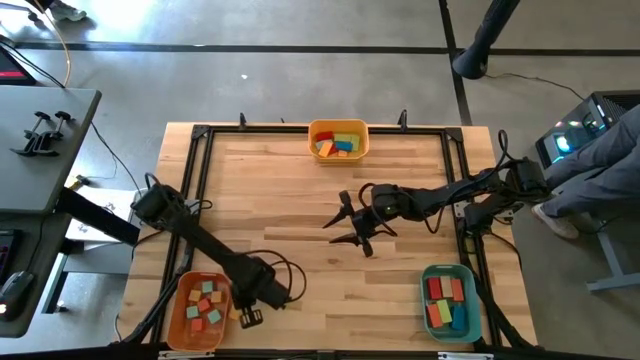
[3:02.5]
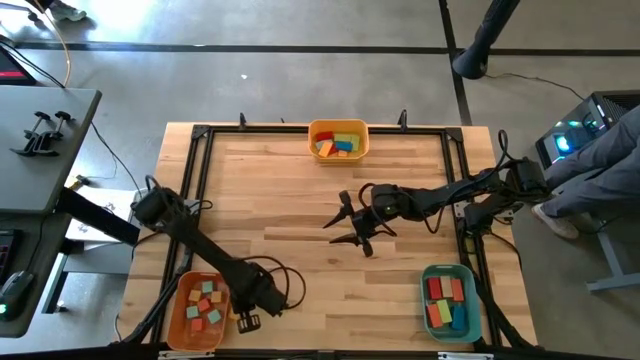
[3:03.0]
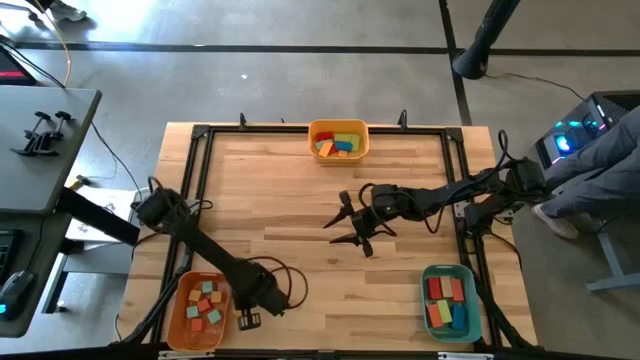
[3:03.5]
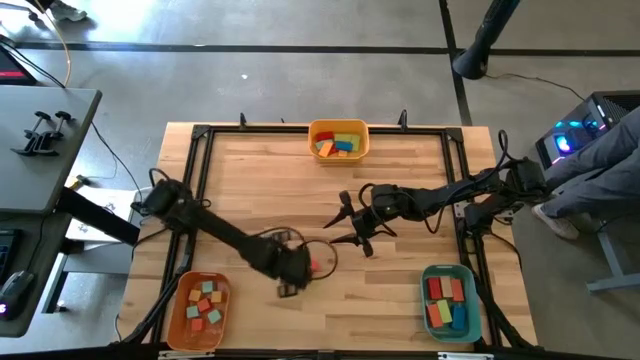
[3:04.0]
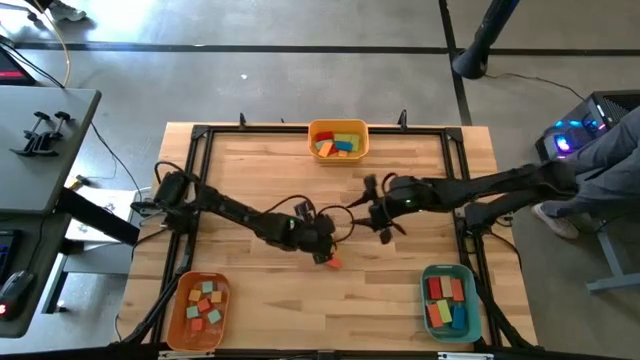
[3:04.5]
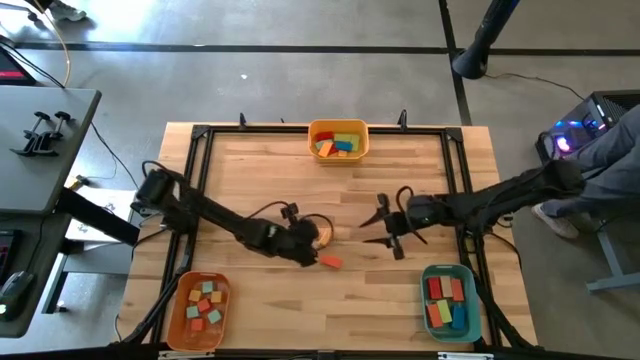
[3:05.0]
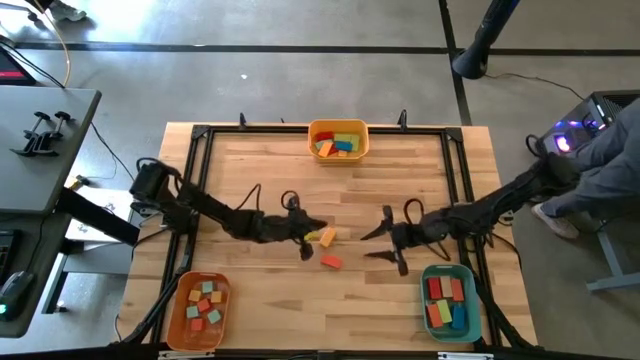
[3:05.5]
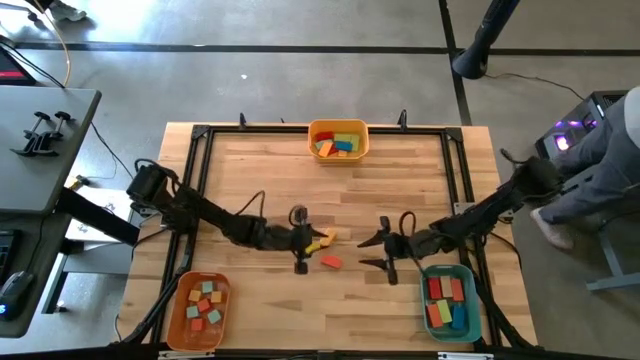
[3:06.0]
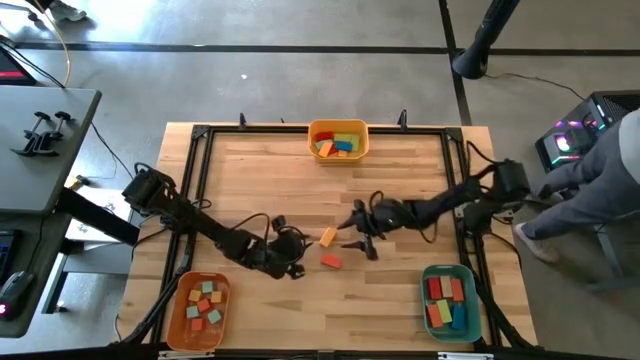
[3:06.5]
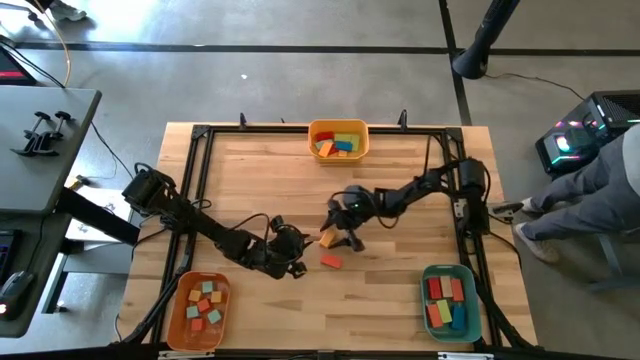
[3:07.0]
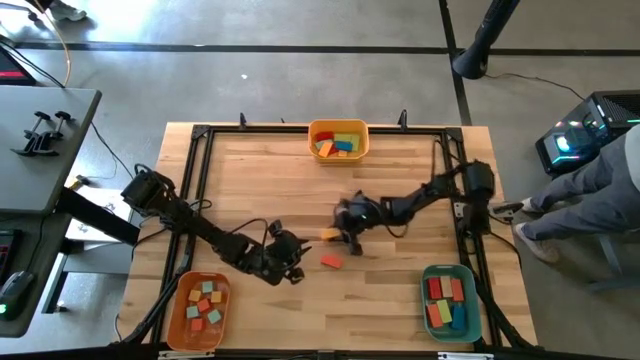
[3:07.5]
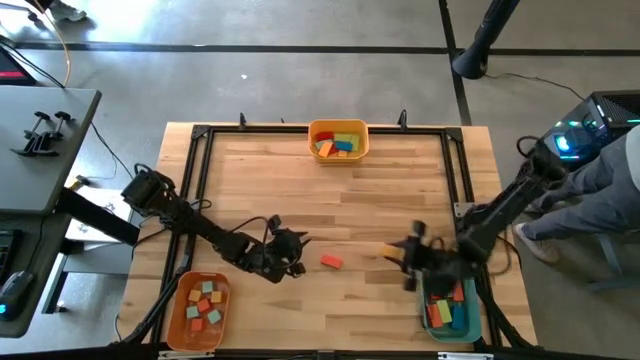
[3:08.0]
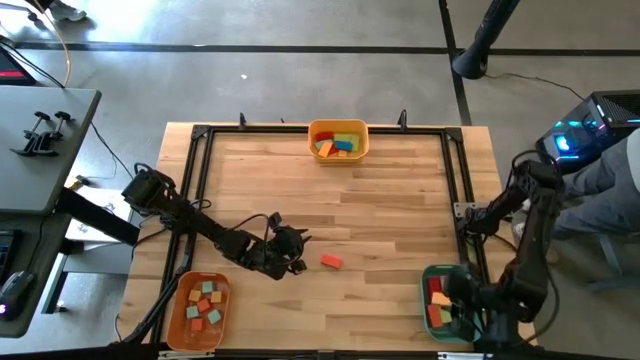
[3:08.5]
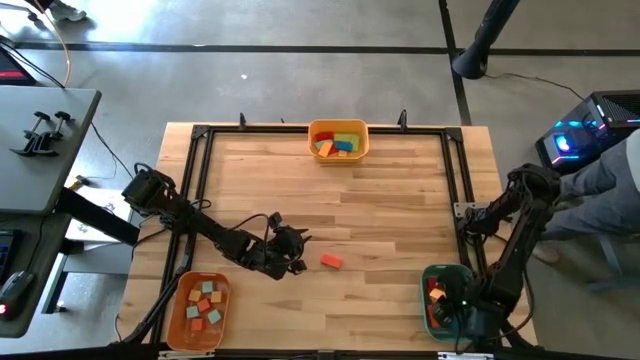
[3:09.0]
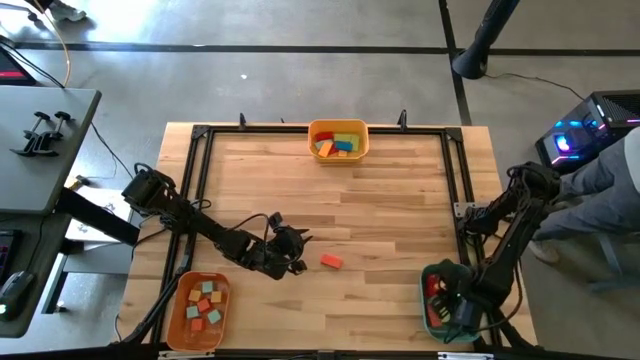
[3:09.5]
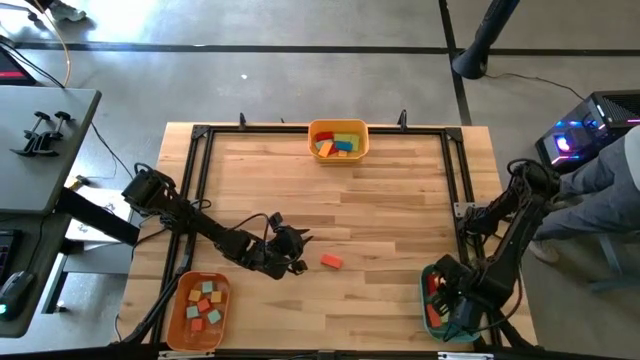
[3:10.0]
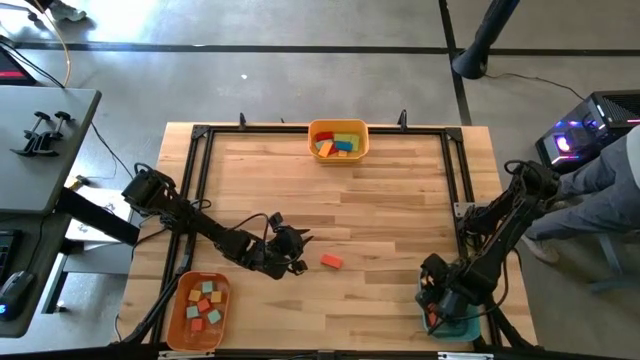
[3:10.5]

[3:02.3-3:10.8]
Task: Sort blocks by size
Put the large yellow rectangle block into the green bin

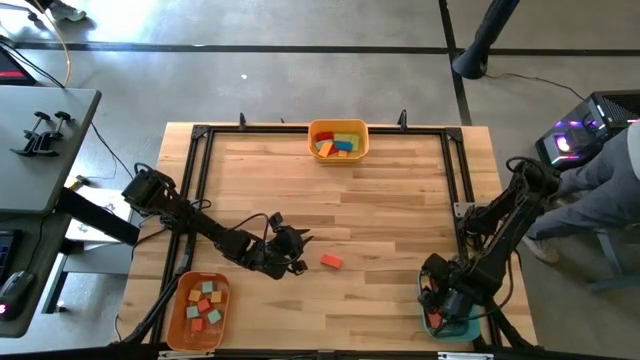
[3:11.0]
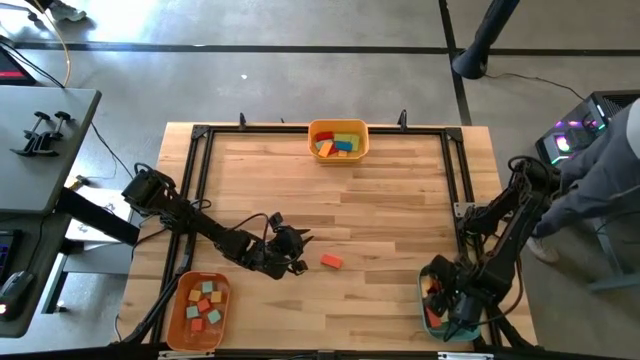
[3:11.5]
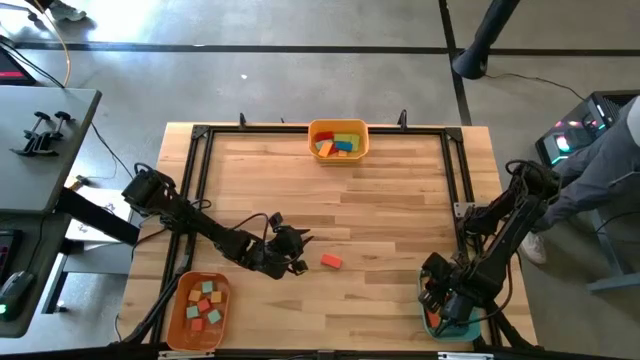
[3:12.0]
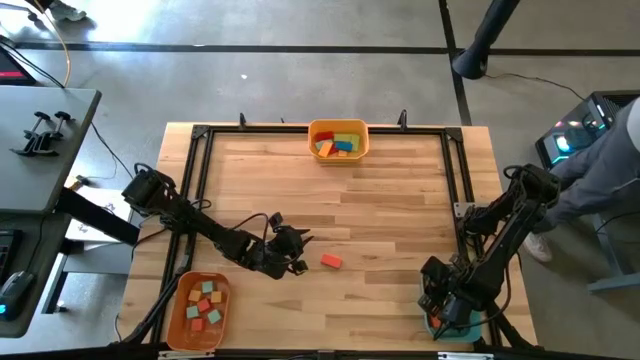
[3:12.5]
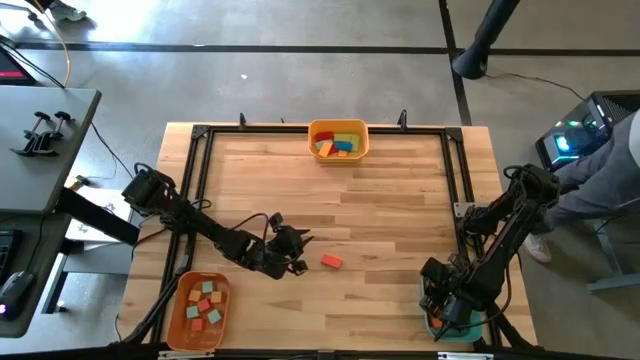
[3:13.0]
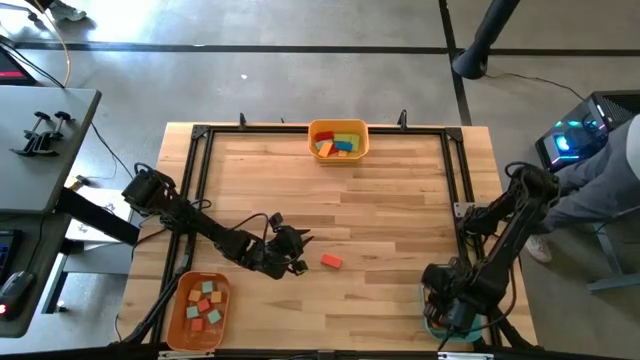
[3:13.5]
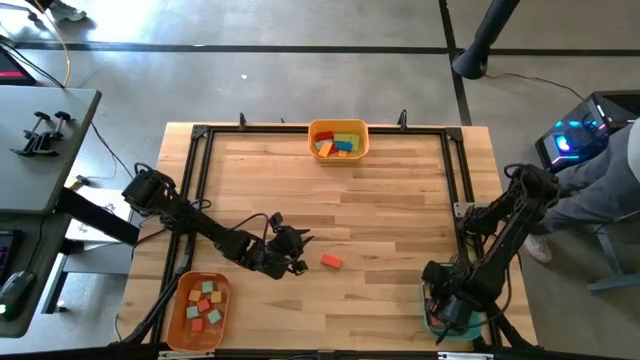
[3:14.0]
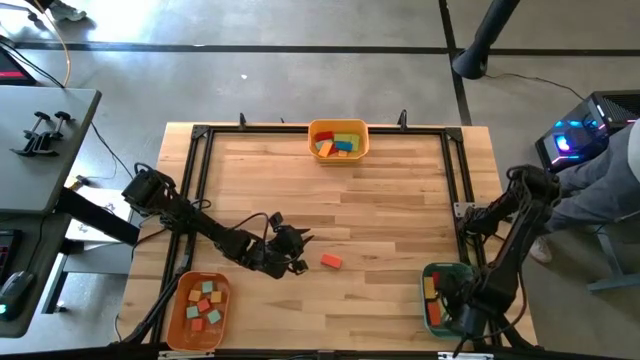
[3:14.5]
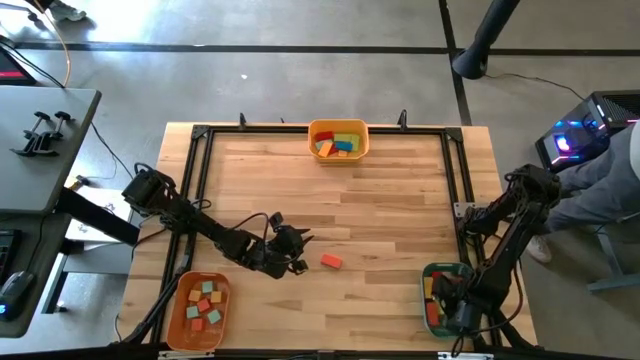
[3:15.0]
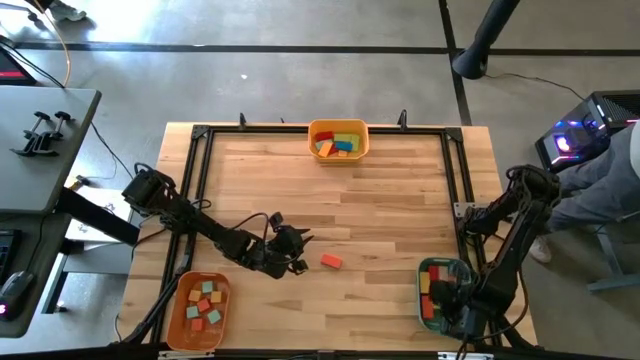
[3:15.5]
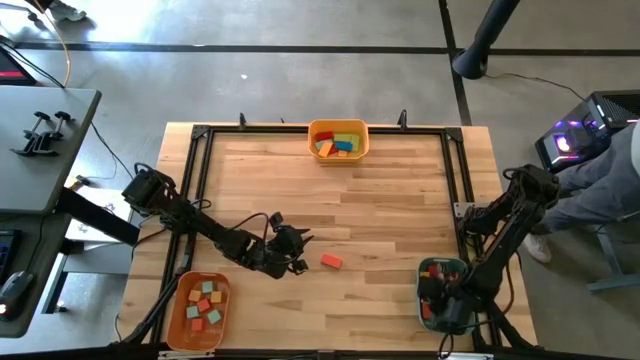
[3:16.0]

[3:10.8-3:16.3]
Adjust the blocks in the green bin

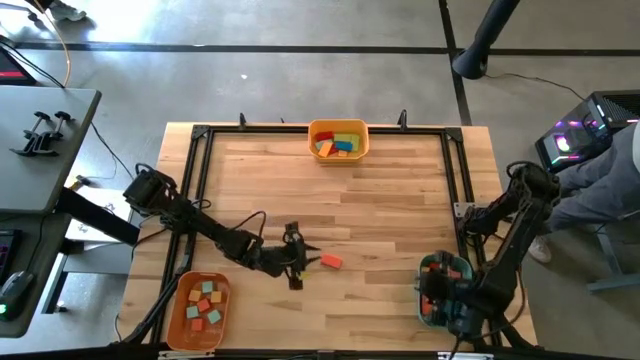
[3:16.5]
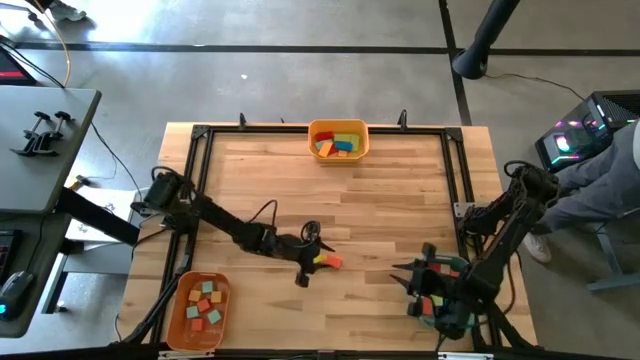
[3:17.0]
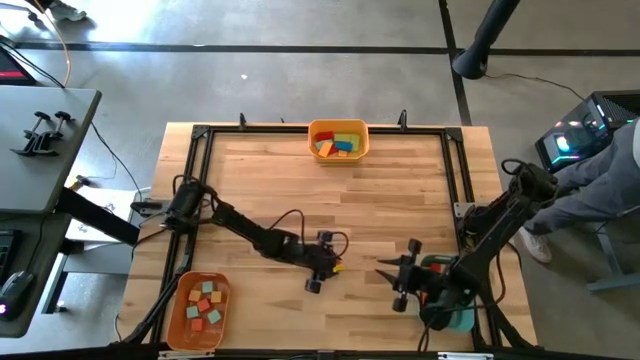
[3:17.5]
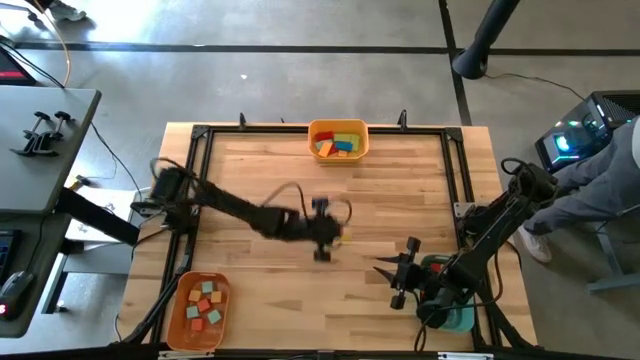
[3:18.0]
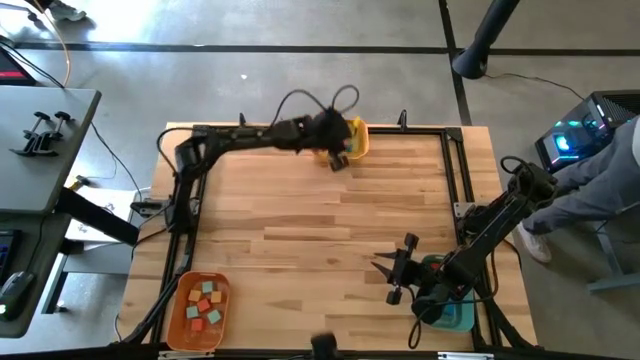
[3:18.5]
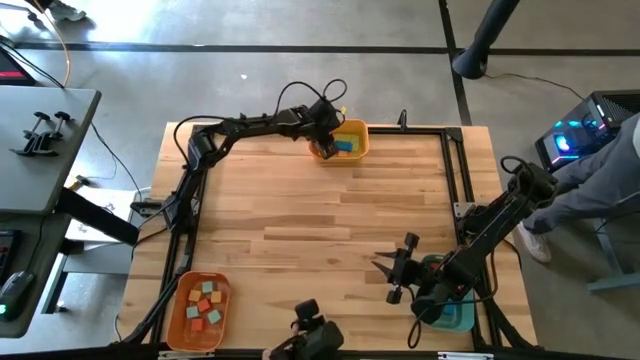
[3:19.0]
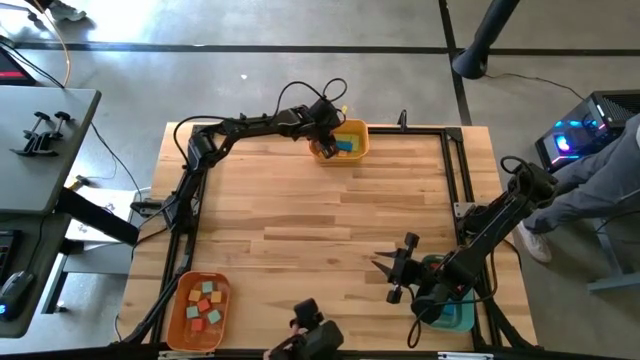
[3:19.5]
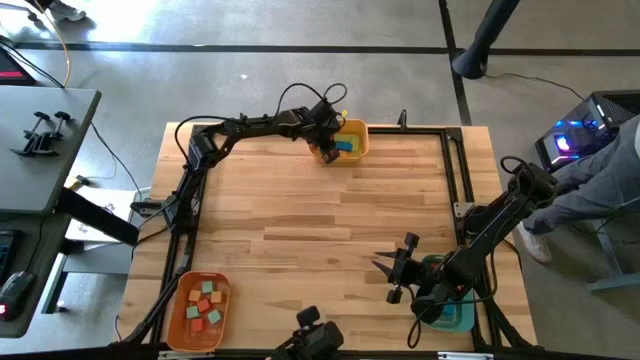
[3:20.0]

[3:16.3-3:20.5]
Put the small orange rectangle block into the yellow bin

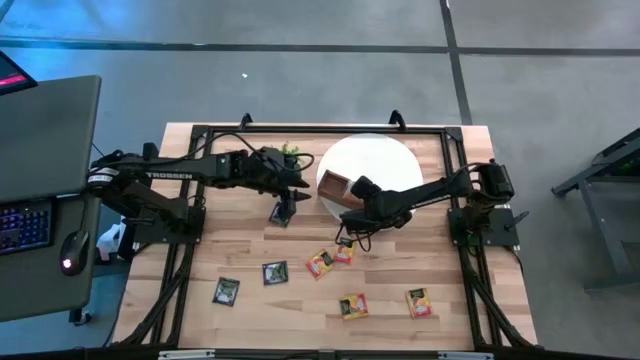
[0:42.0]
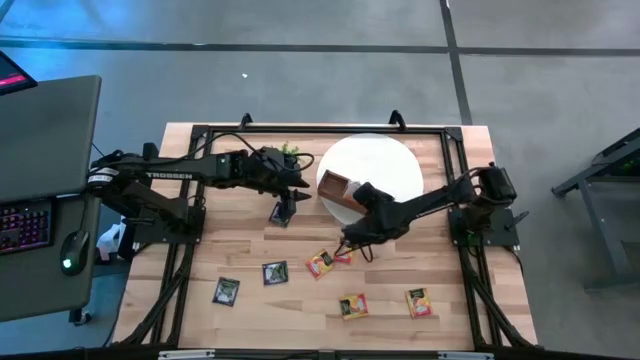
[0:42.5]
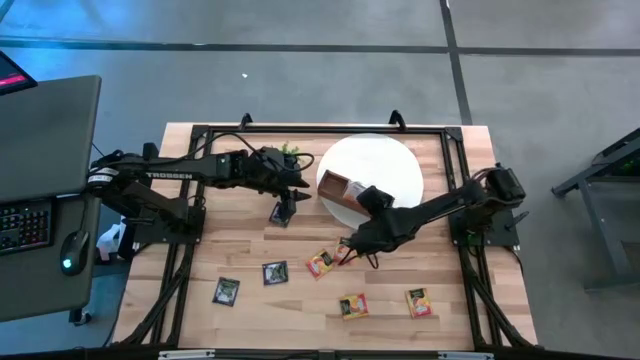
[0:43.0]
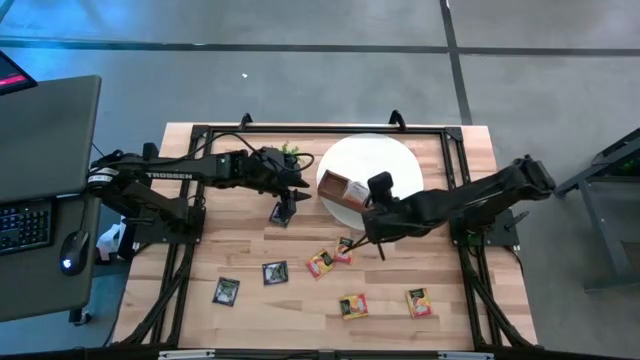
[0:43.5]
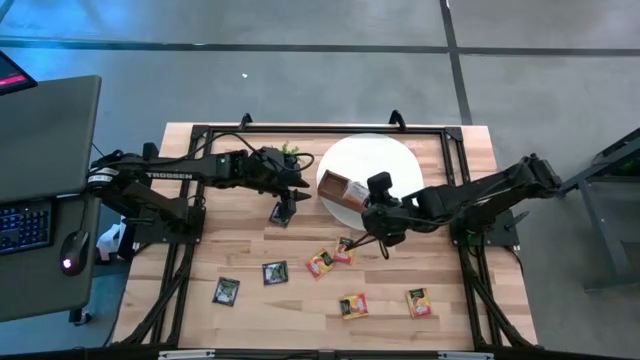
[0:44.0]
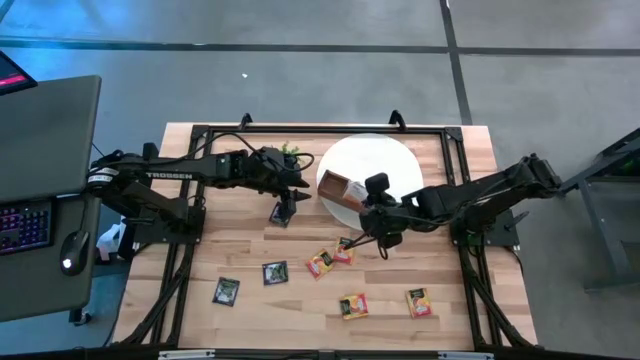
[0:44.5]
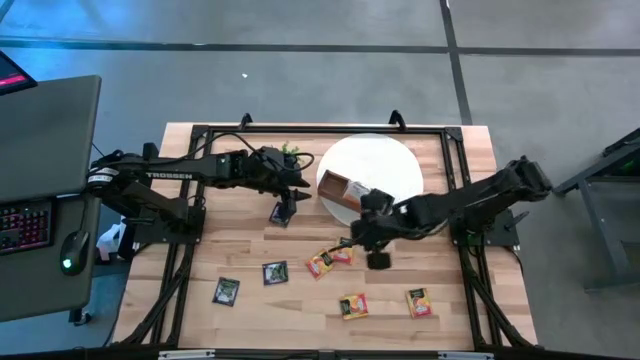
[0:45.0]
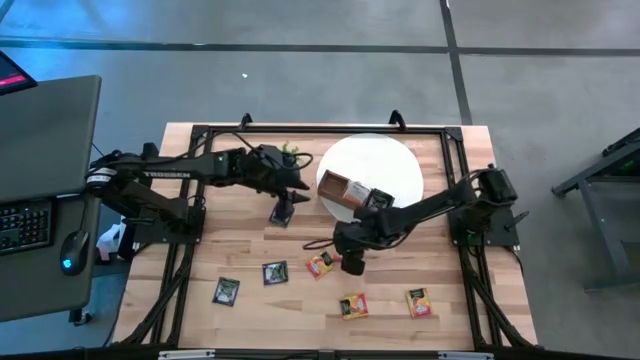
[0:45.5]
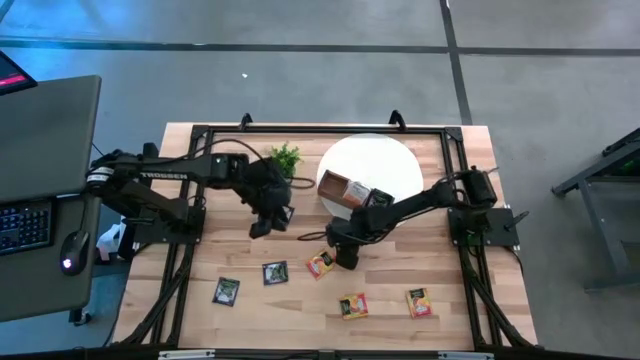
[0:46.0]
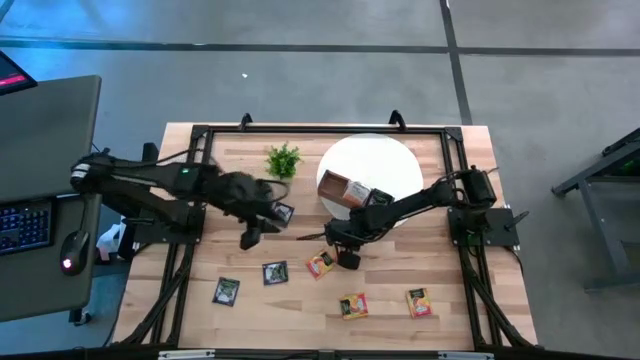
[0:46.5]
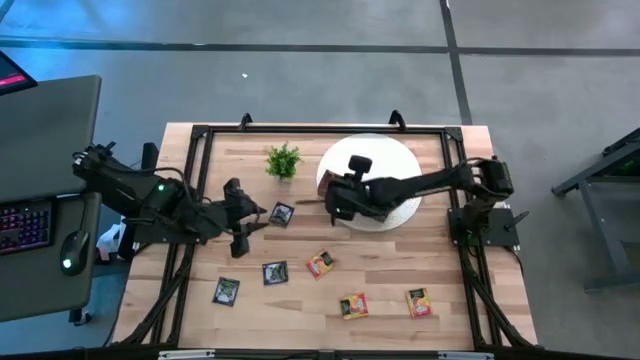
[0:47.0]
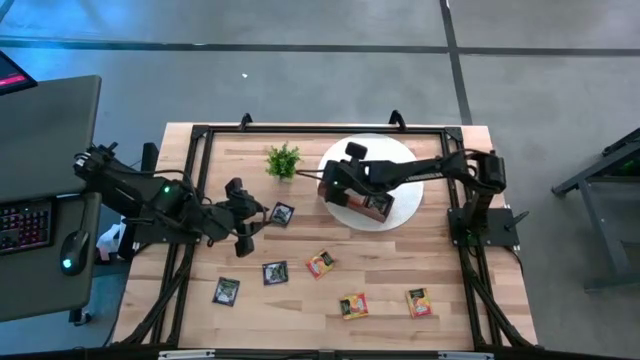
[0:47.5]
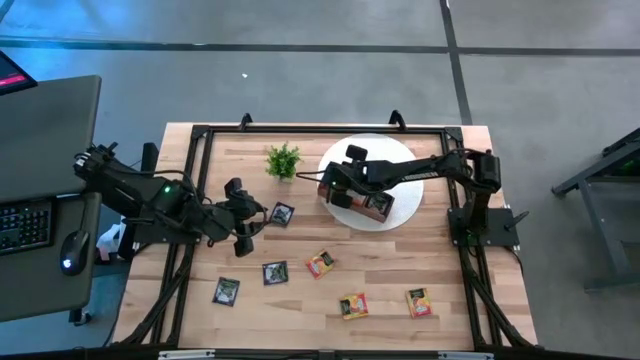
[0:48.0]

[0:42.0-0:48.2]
Task: Pick & Place Tea
Put the yellow tea bag into the left compartment of the wooden organizer
